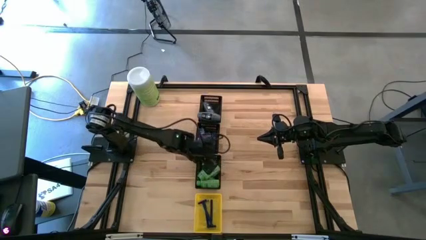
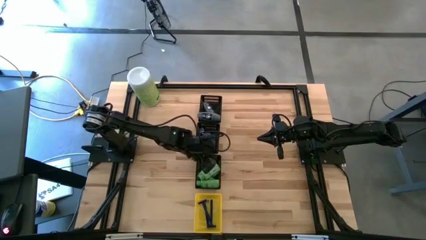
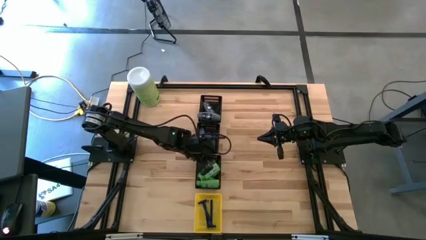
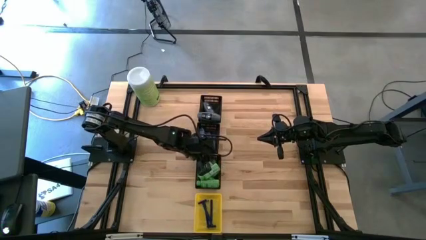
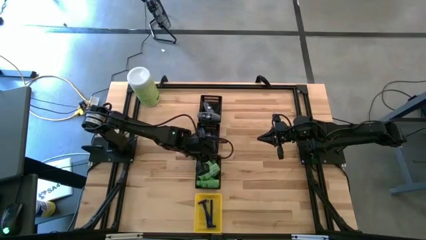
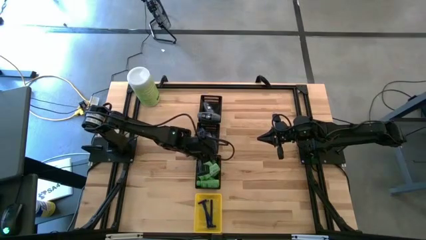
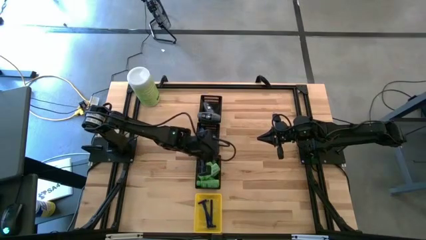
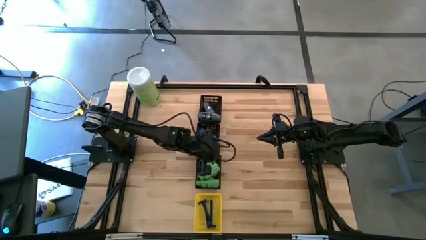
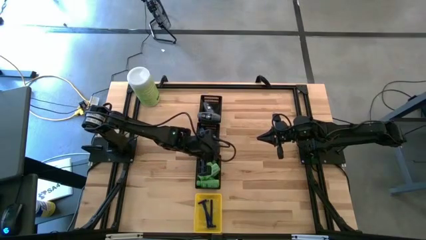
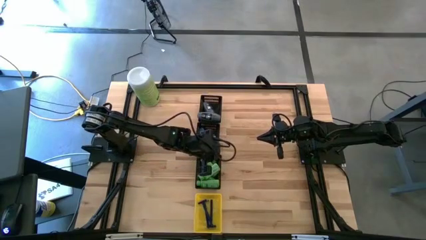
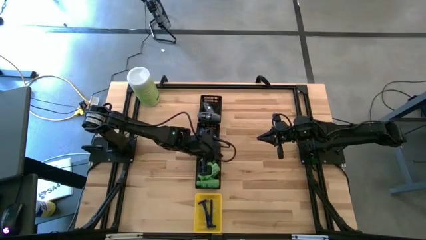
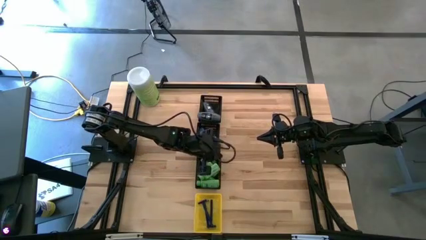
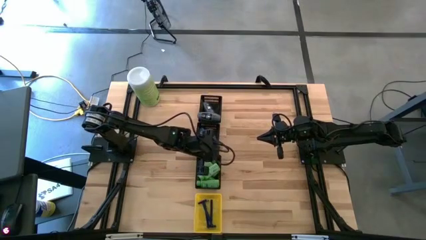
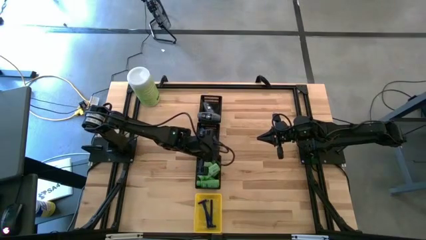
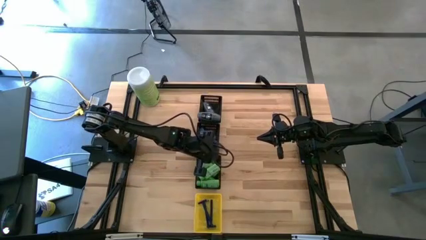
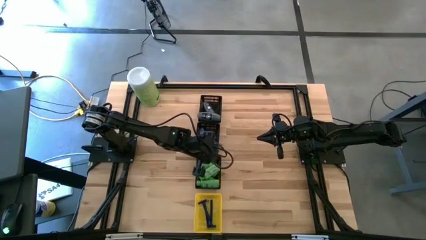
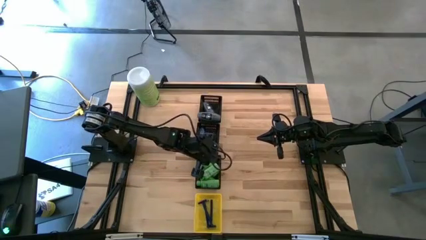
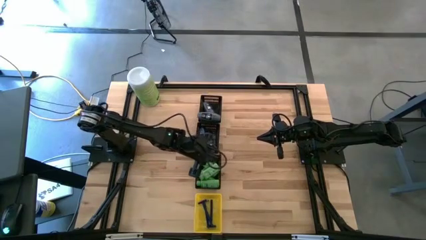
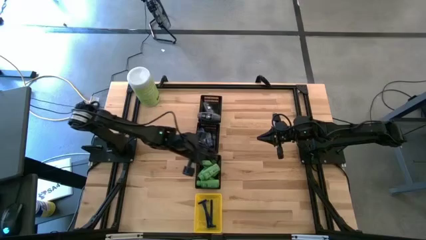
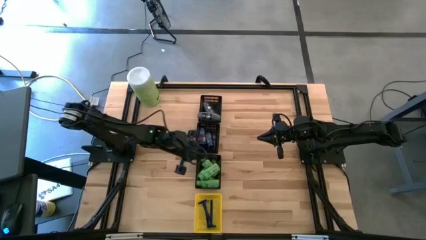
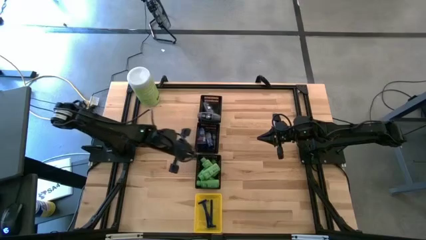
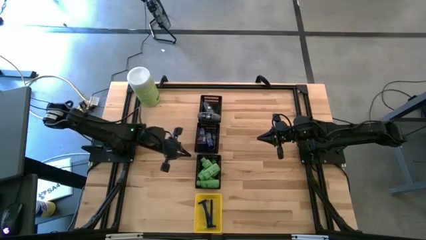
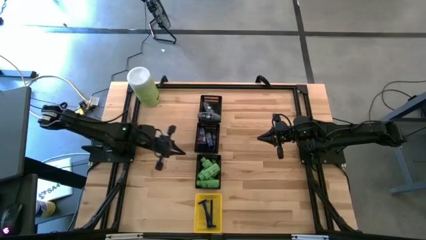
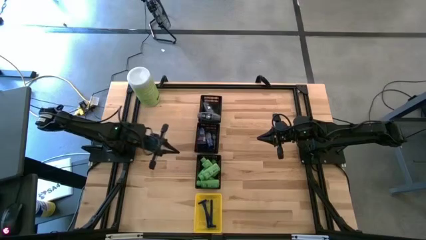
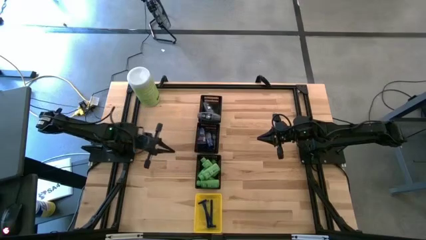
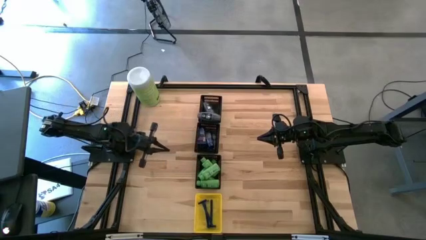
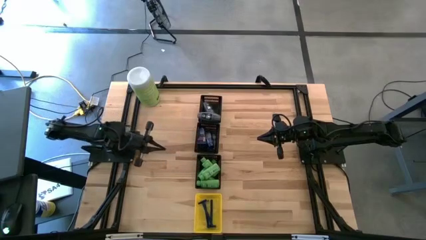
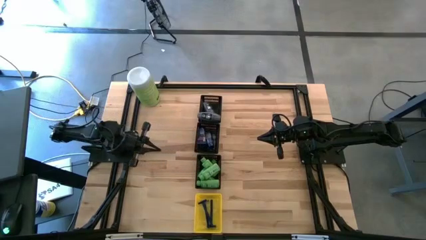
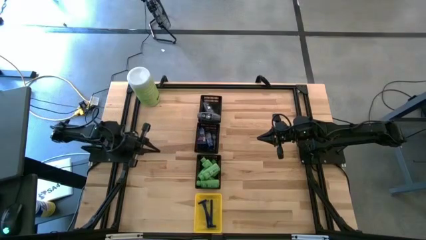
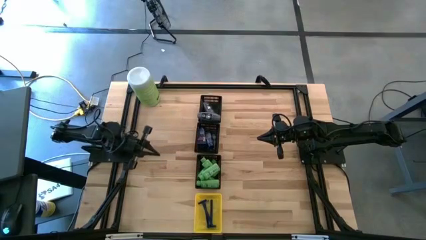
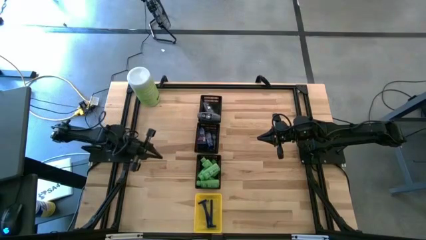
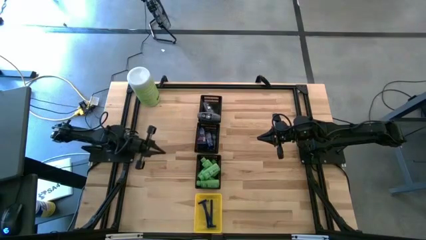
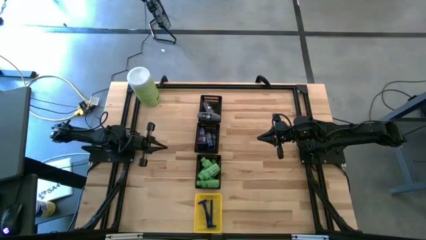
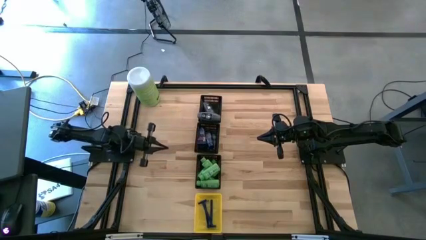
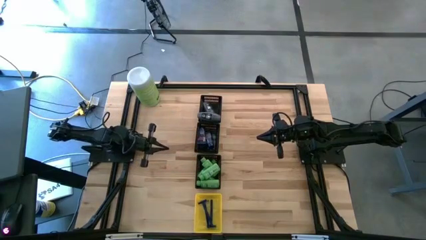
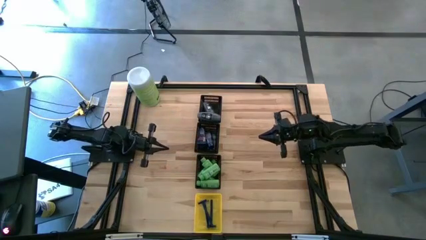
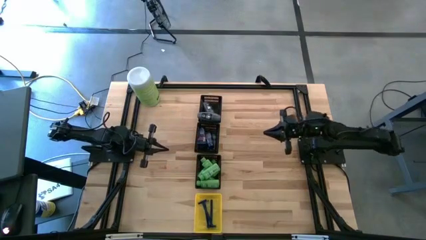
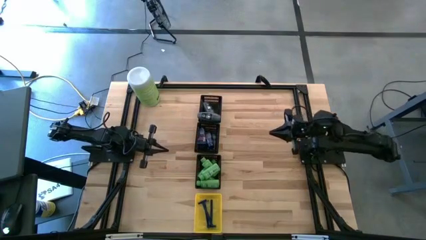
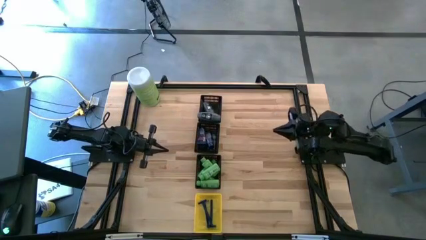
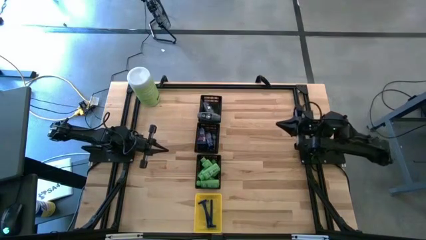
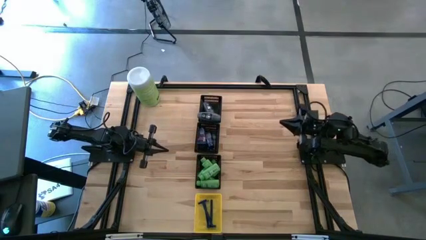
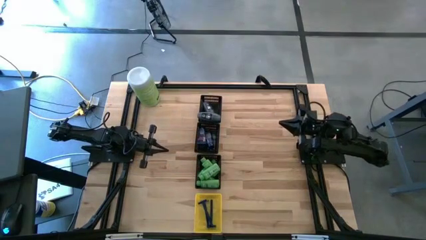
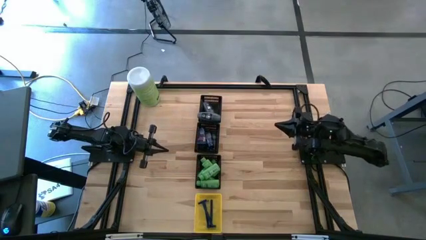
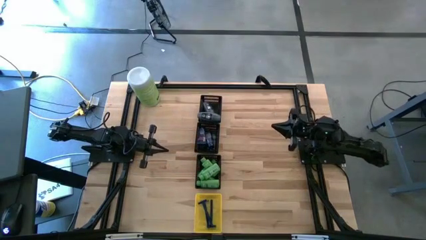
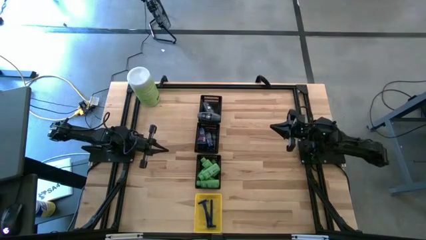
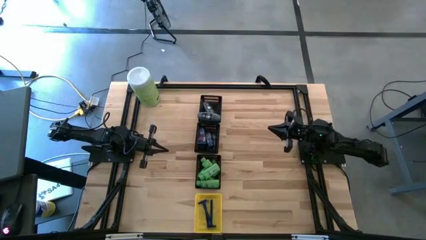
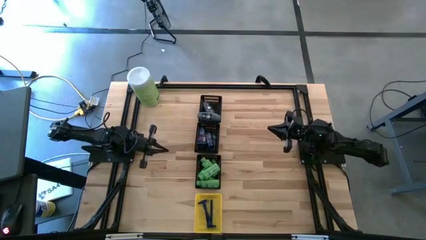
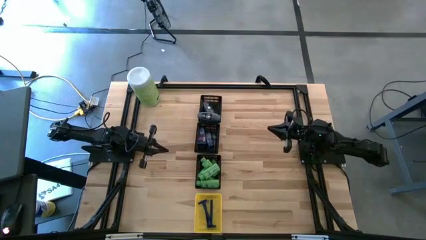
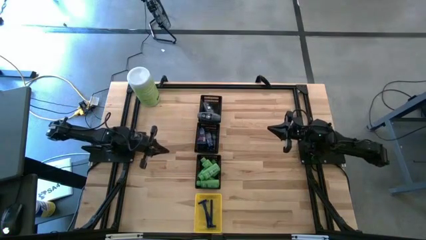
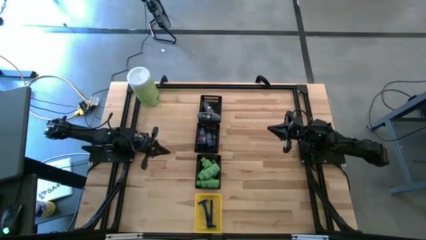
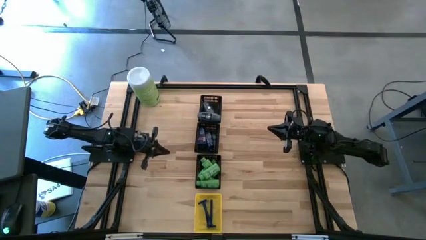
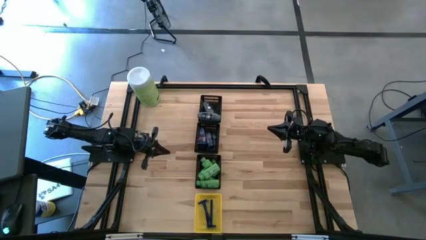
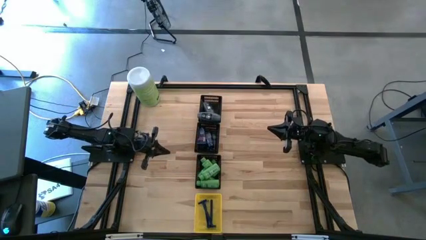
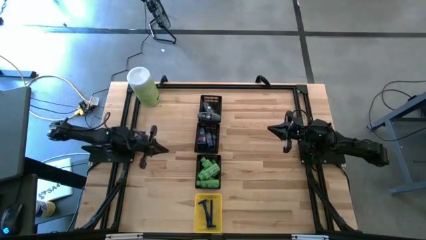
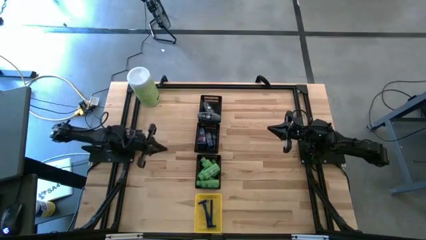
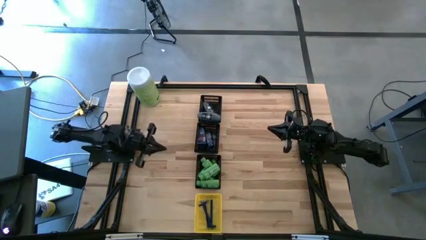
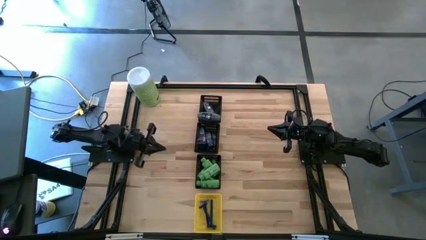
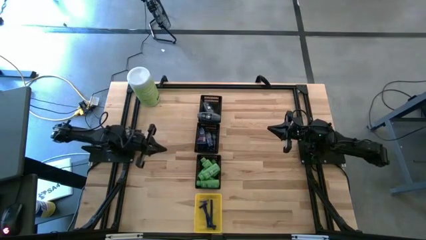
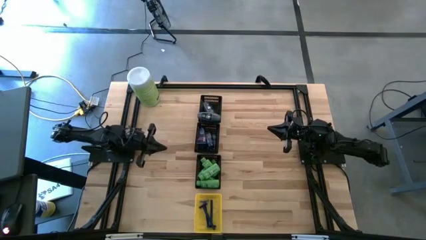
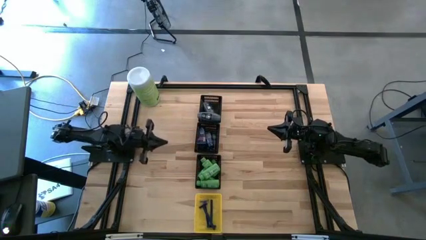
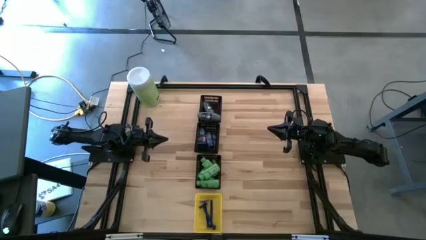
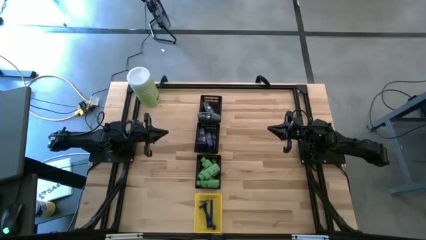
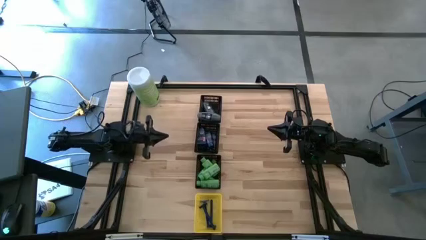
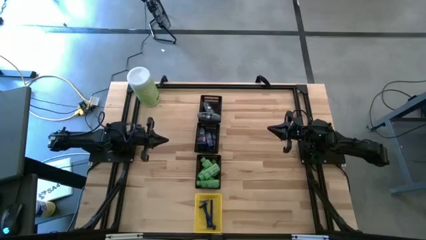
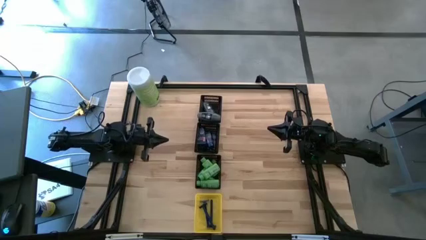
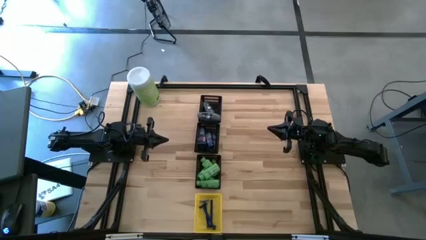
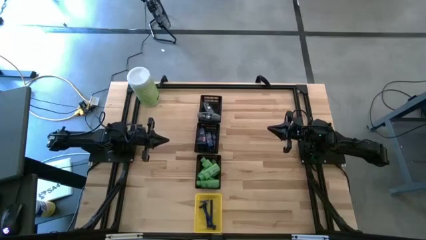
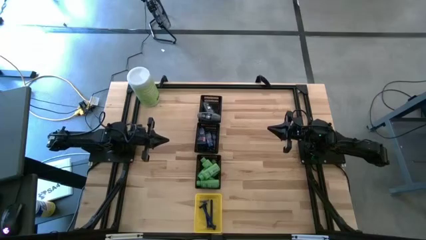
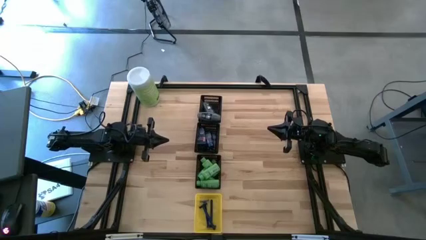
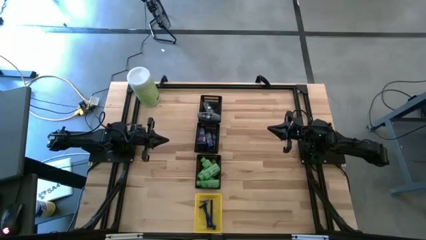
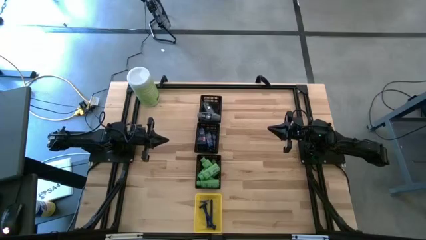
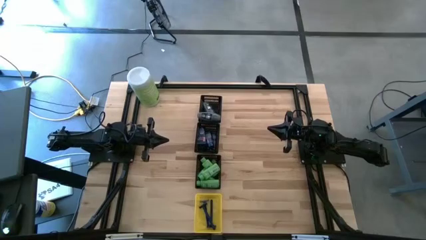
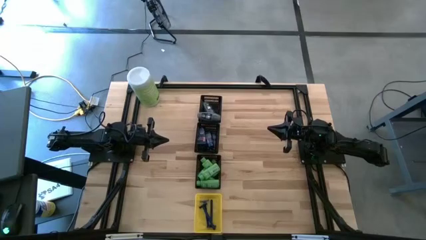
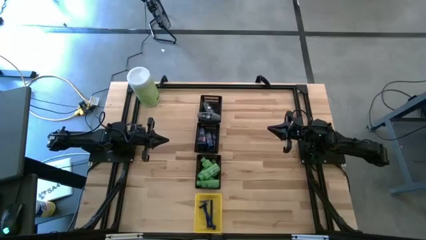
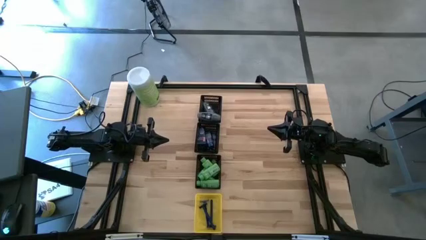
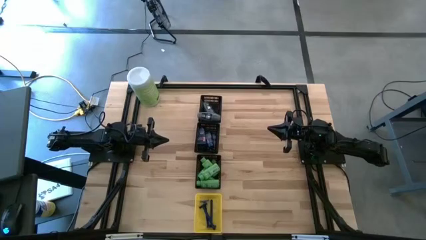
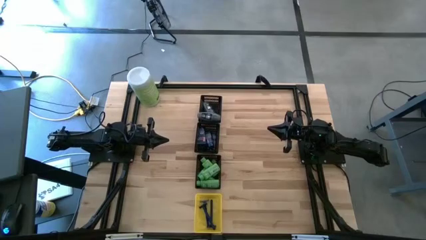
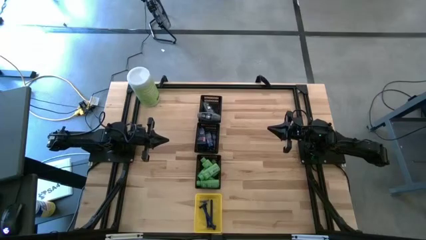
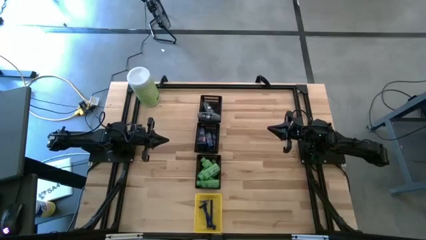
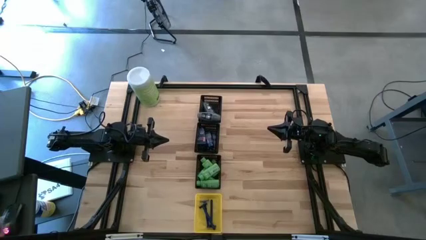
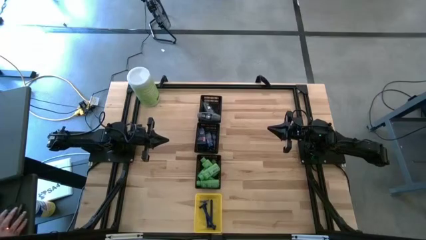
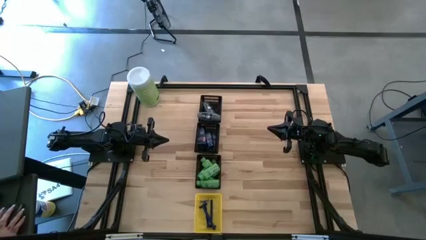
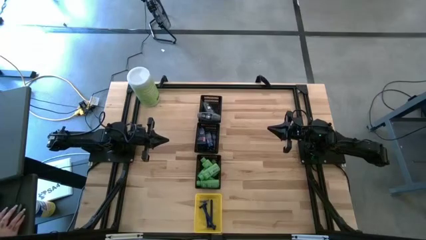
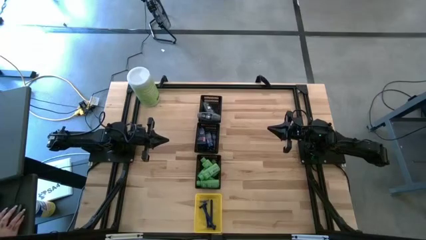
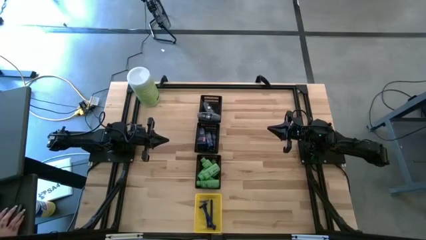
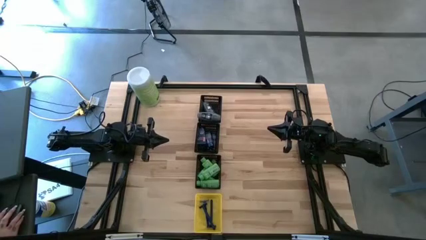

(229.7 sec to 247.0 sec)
Task: Pick & Place Travel size toiletries
Return to Home Position
